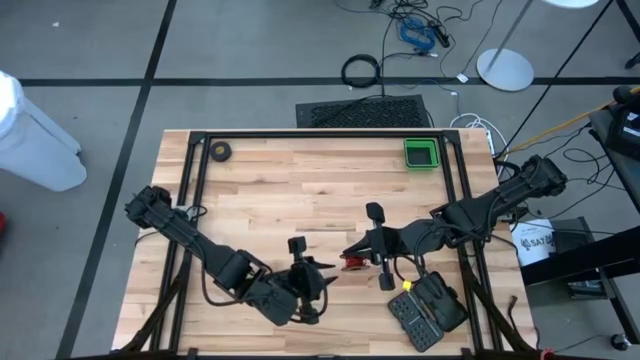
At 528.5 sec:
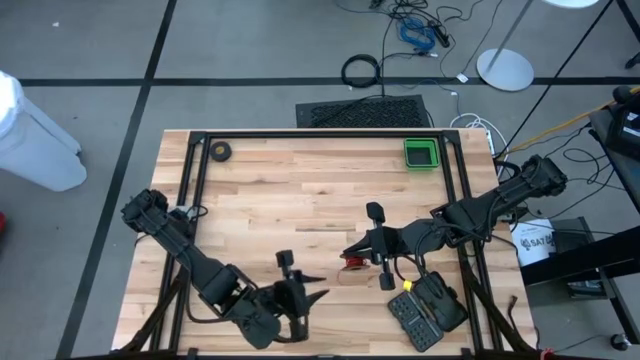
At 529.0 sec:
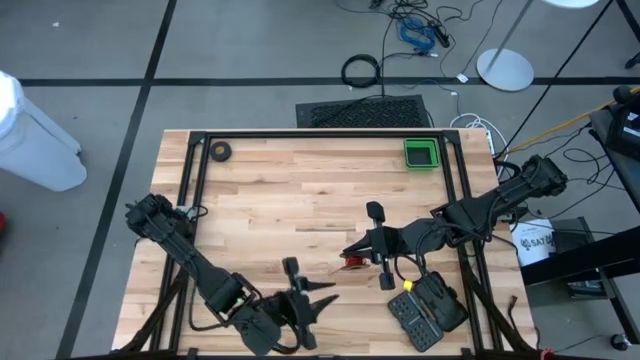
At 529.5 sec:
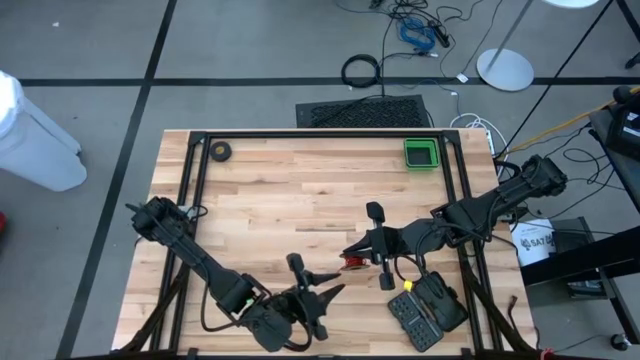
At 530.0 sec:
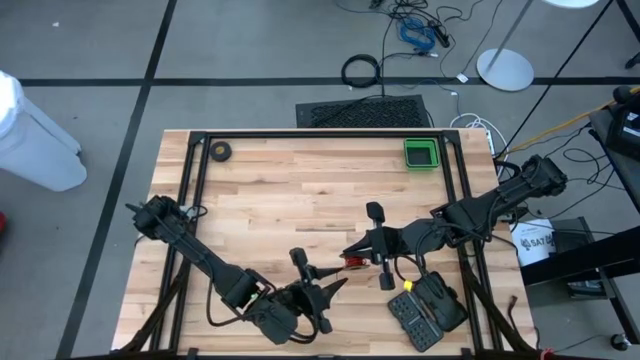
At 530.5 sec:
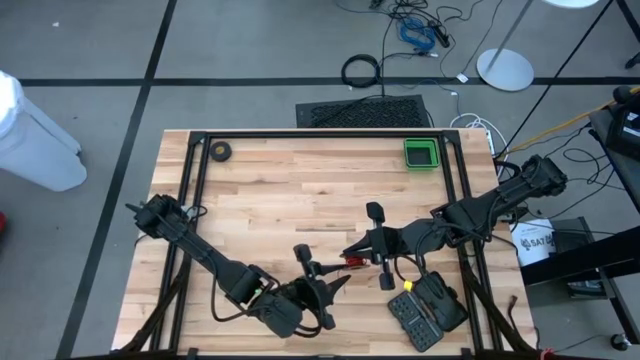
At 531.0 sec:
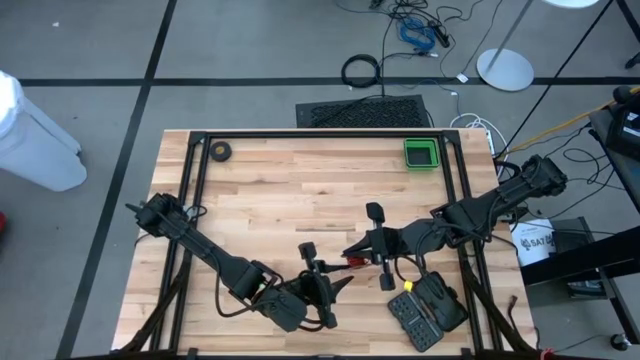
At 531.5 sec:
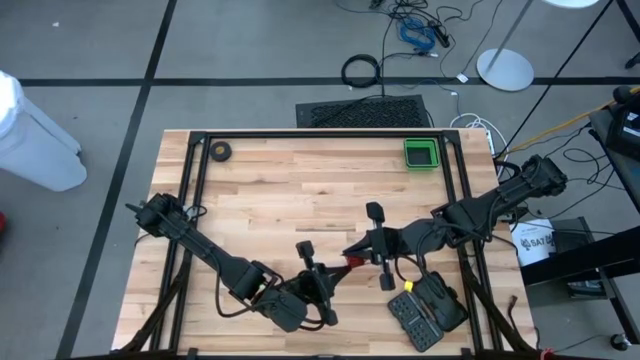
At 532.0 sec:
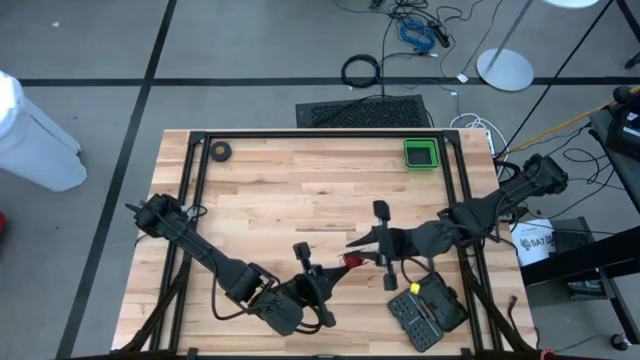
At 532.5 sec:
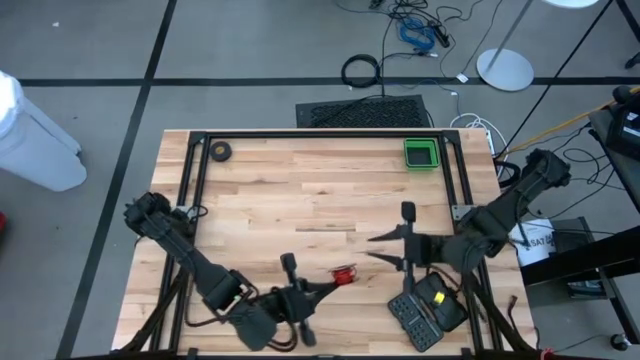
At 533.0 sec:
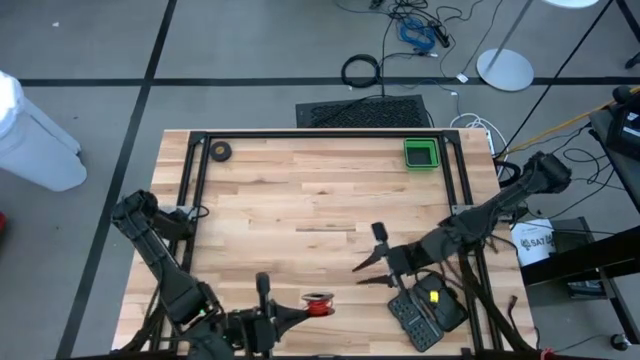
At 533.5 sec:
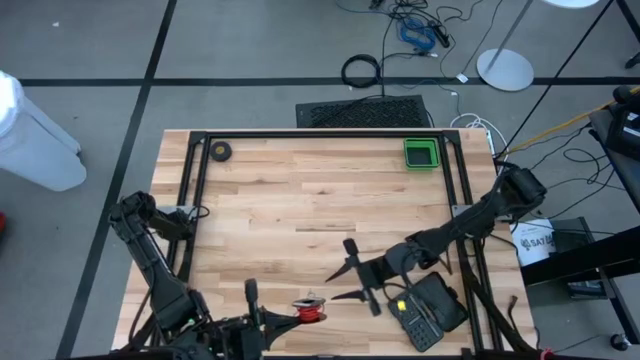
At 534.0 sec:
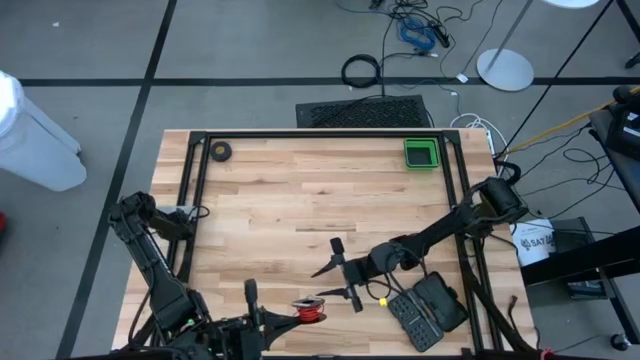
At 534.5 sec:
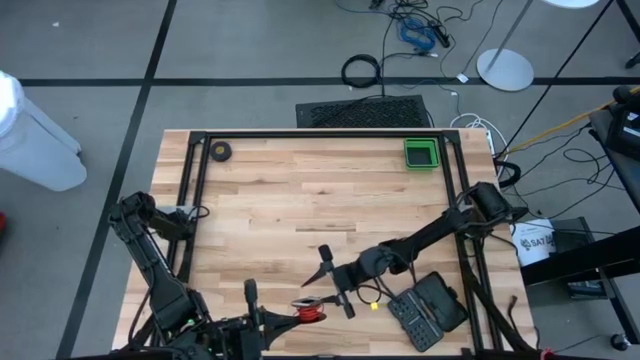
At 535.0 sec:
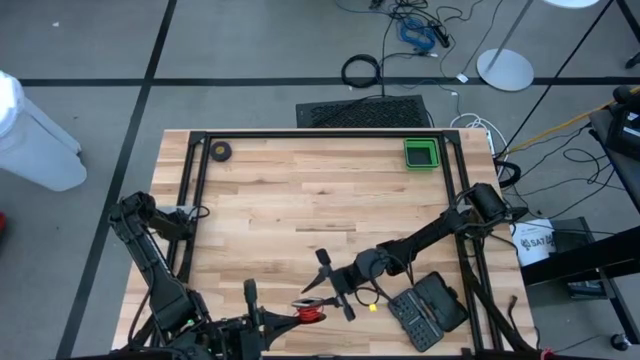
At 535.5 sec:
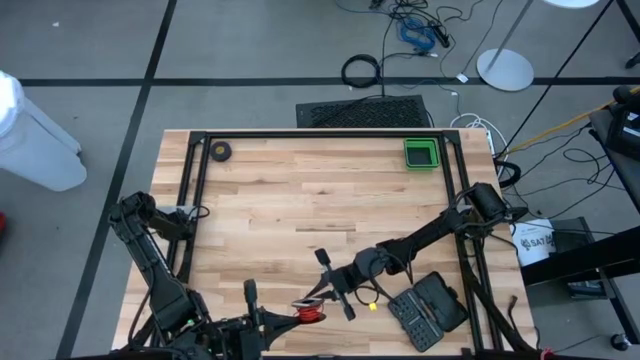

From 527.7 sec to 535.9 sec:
Task: Coil cords
Coil the red wire into the spool

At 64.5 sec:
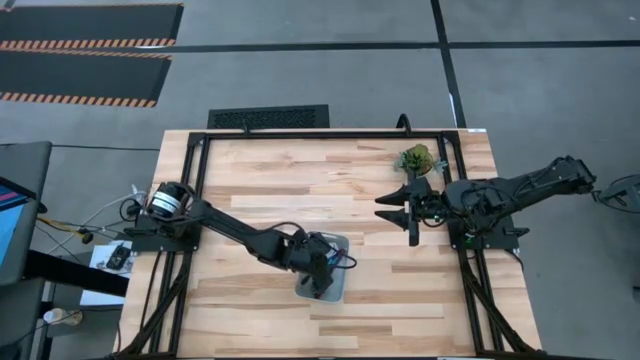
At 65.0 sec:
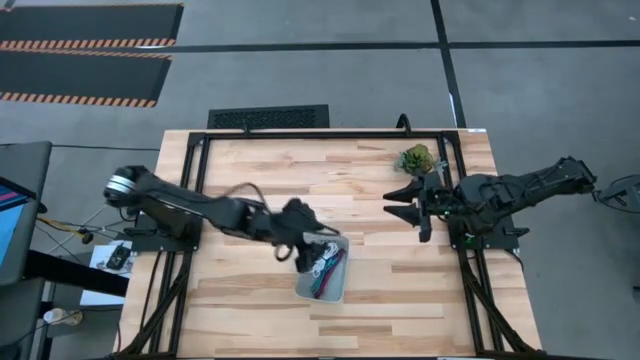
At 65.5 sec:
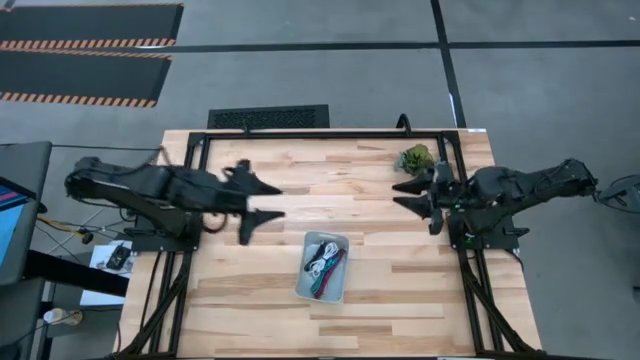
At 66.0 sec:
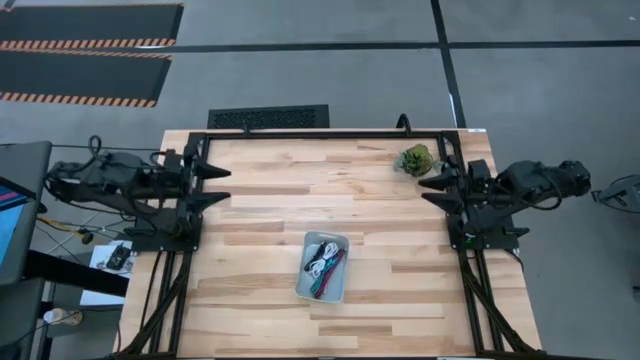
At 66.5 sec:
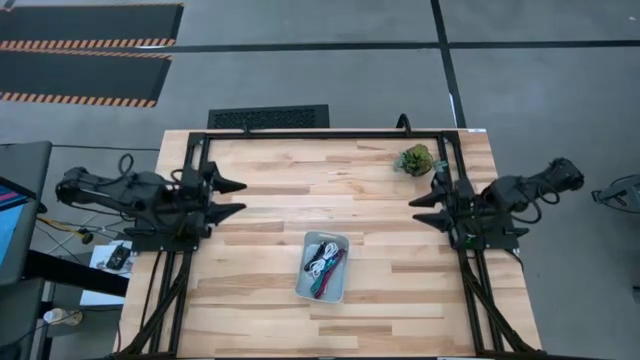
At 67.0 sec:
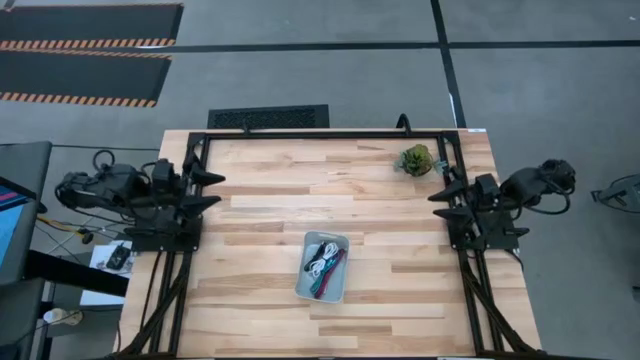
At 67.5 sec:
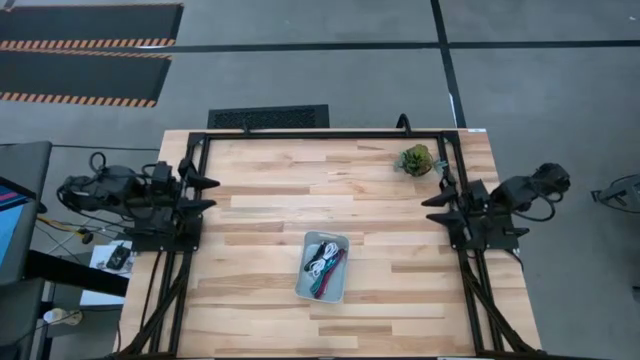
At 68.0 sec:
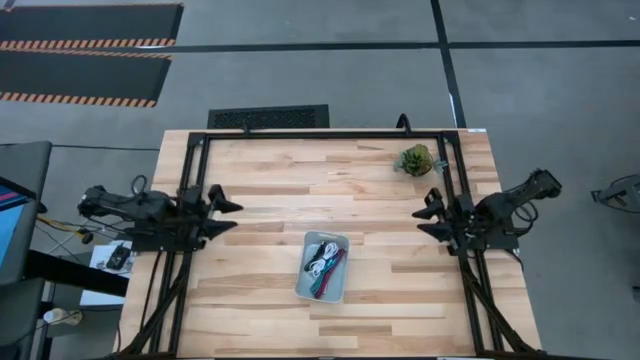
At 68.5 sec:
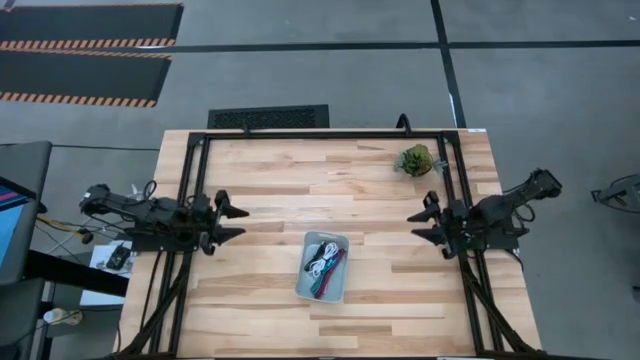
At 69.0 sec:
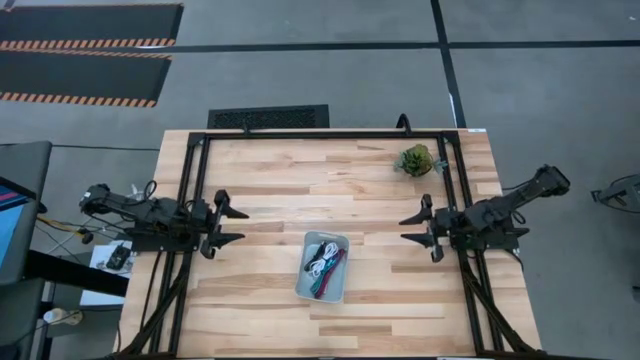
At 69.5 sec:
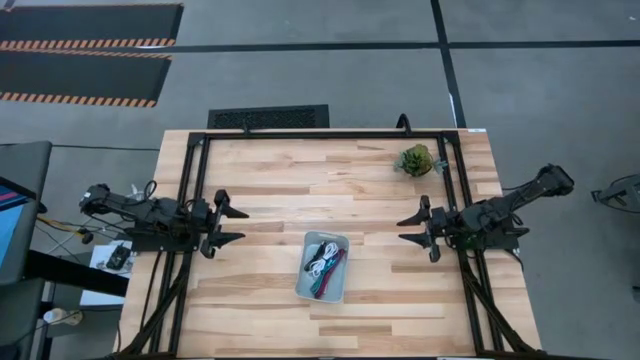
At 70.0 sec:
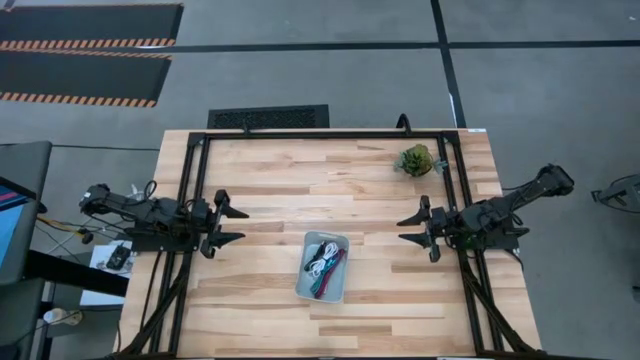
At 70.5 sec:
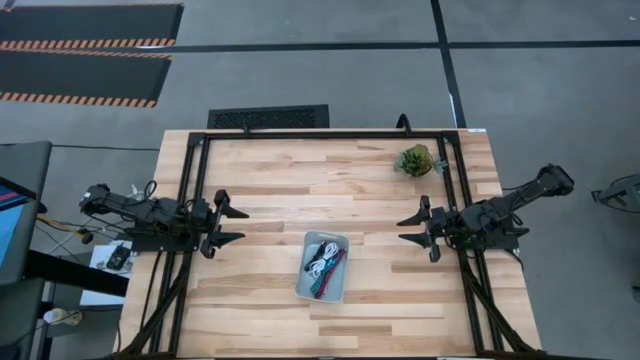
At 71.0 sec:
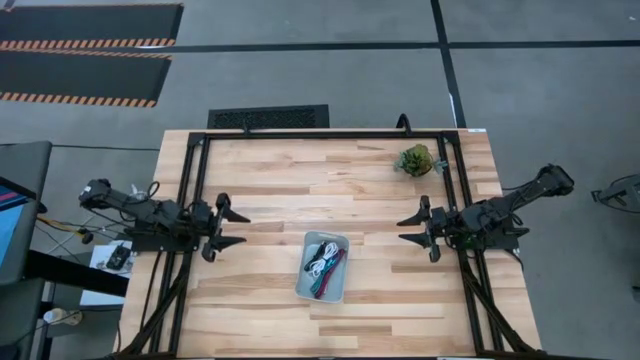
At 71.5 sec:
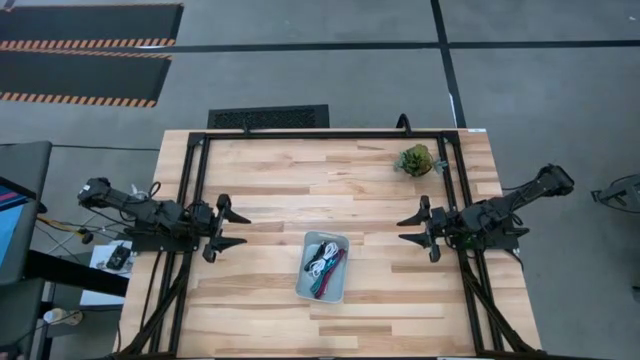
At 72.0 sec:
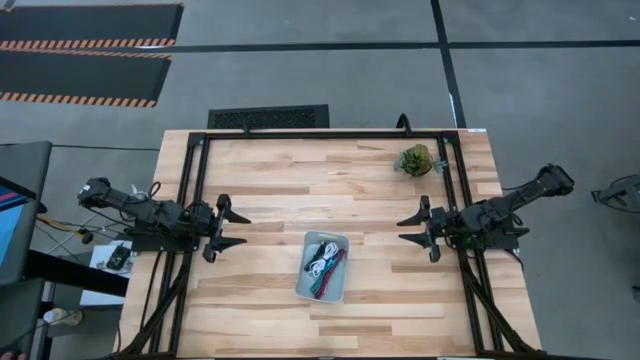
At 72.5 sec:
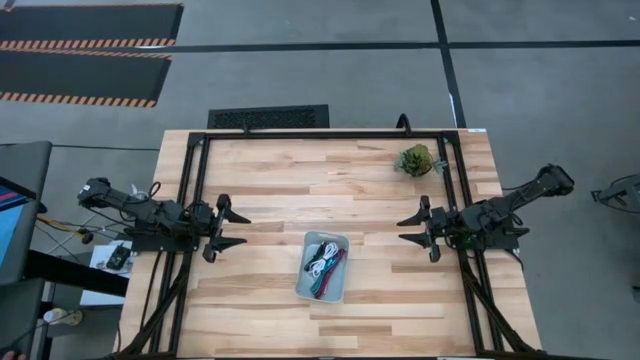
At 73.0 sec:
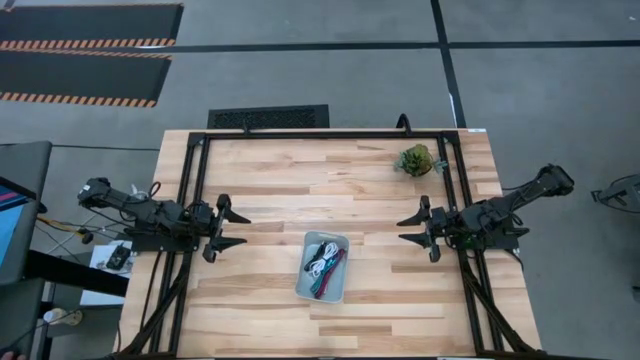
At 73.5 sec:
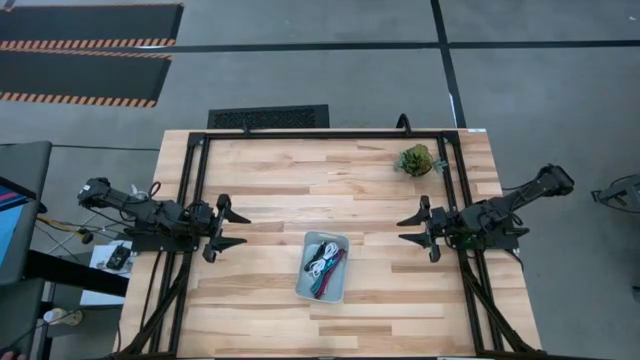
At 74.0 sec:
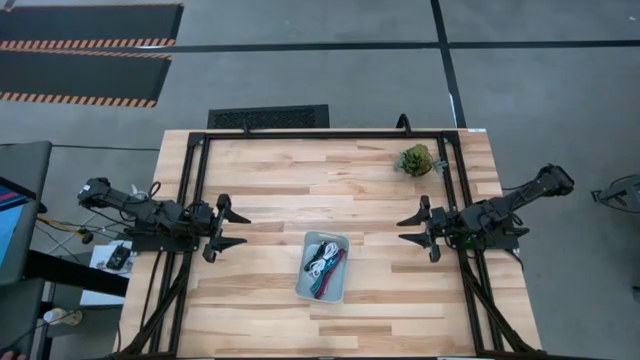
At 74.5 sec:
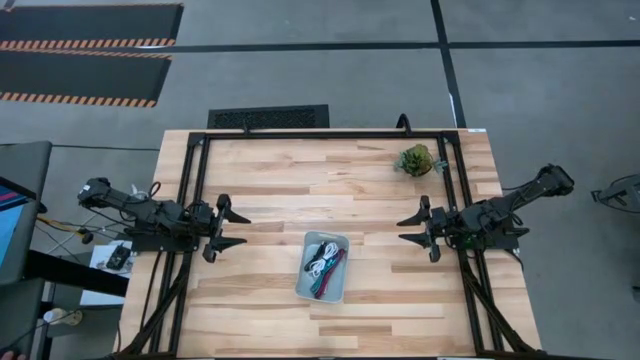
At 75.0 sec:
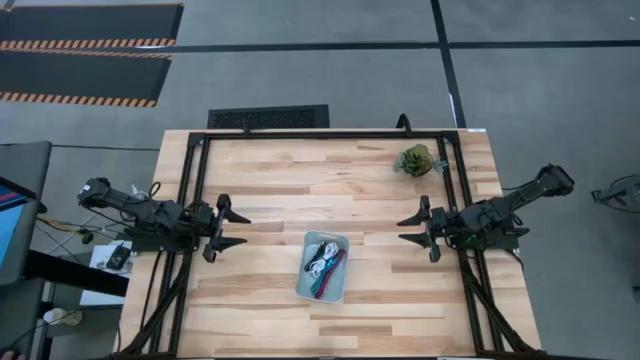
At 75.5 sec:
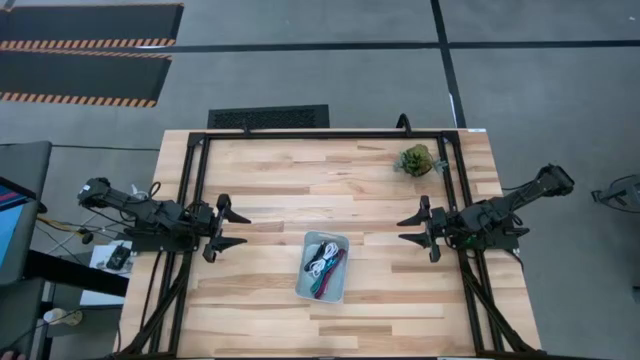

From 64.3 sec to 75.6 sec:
Task: Pick and place USB-C Cables
Return to Home Position
